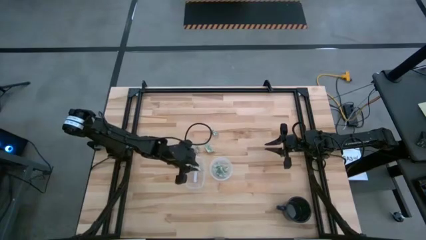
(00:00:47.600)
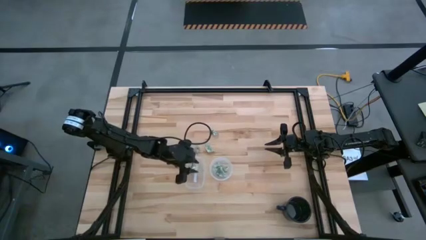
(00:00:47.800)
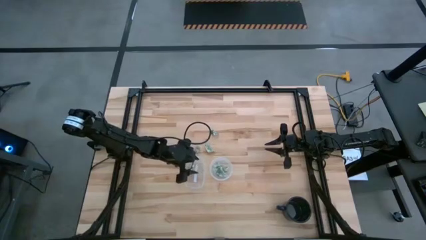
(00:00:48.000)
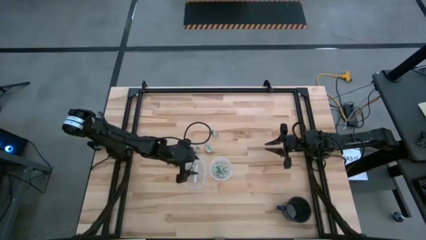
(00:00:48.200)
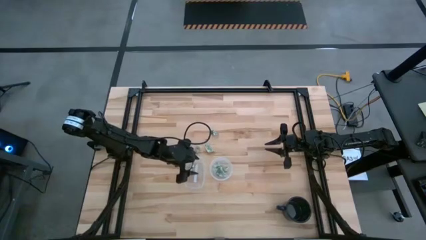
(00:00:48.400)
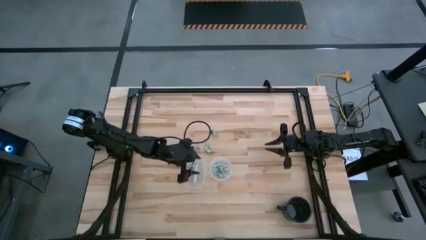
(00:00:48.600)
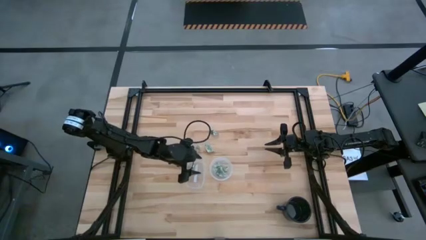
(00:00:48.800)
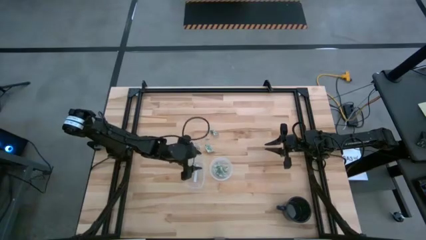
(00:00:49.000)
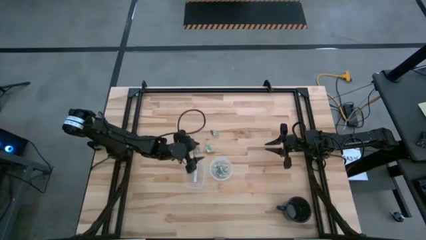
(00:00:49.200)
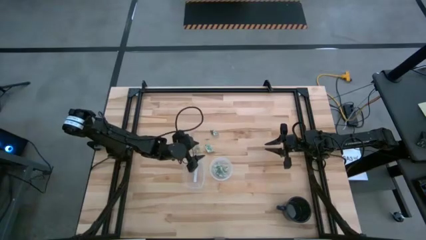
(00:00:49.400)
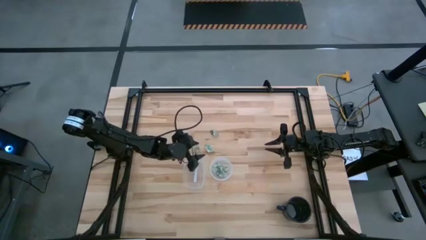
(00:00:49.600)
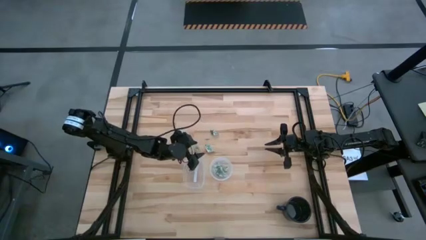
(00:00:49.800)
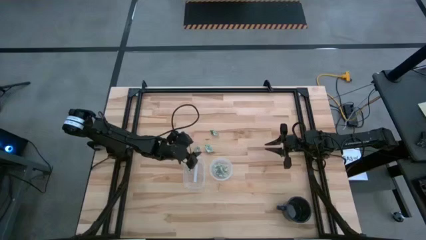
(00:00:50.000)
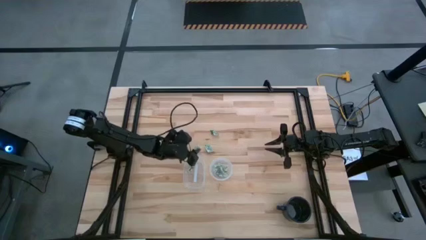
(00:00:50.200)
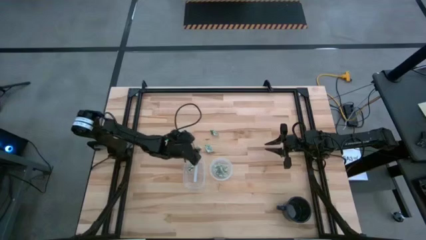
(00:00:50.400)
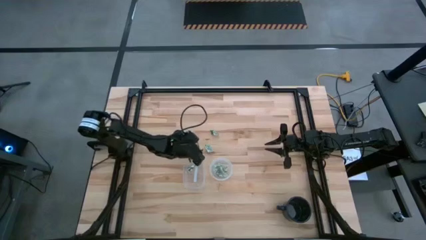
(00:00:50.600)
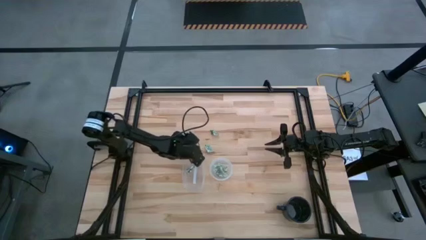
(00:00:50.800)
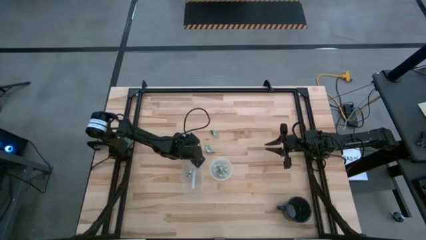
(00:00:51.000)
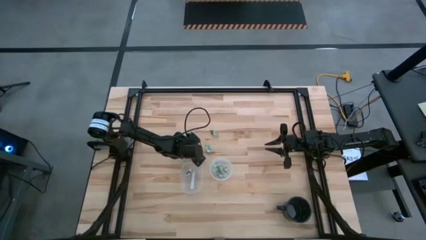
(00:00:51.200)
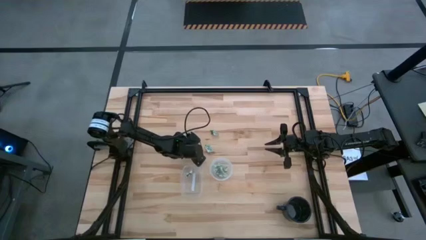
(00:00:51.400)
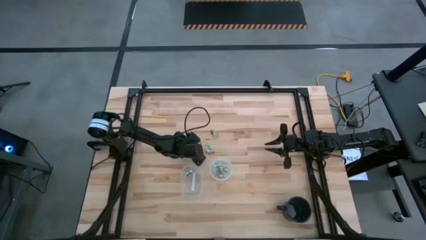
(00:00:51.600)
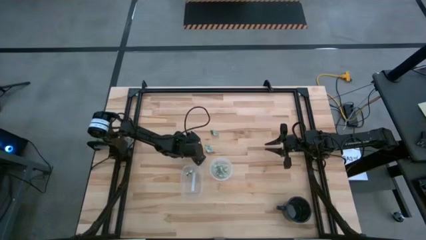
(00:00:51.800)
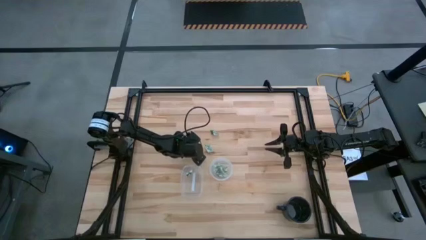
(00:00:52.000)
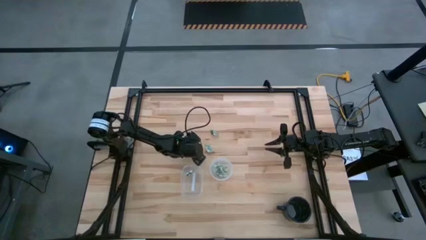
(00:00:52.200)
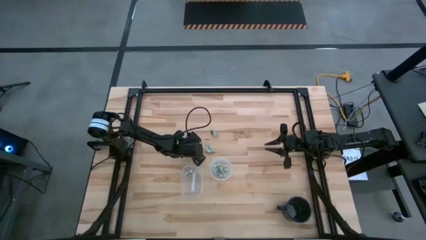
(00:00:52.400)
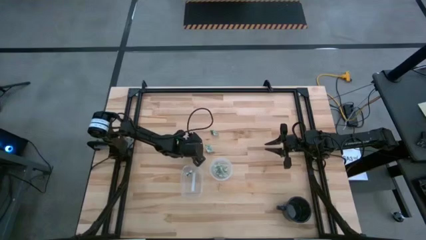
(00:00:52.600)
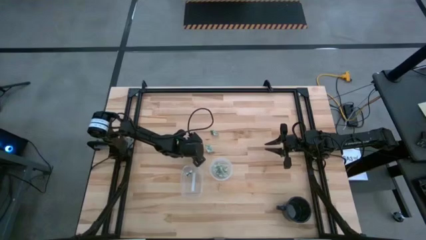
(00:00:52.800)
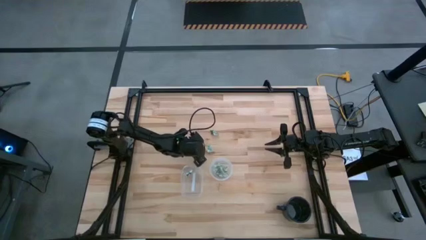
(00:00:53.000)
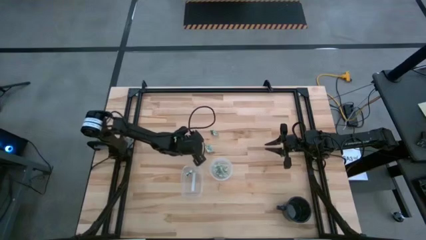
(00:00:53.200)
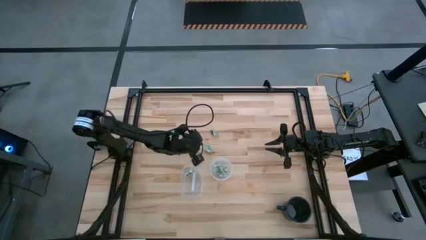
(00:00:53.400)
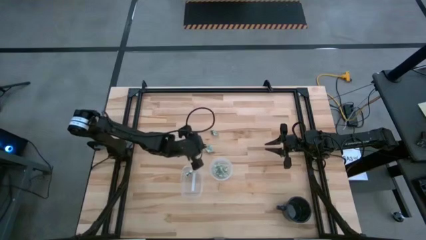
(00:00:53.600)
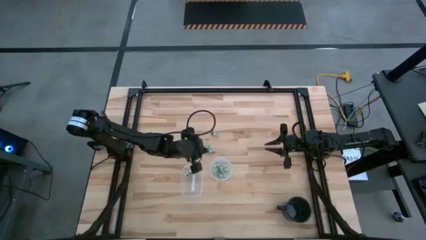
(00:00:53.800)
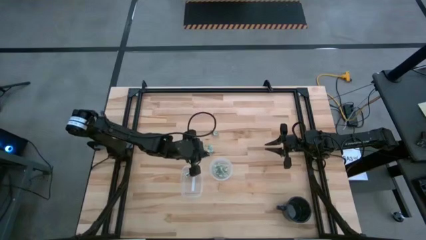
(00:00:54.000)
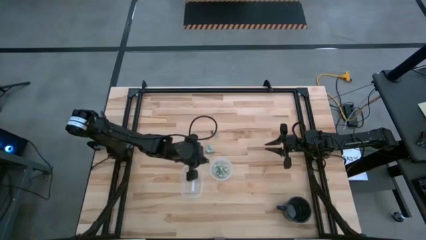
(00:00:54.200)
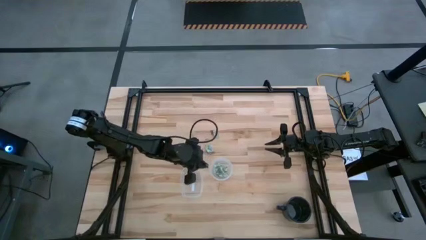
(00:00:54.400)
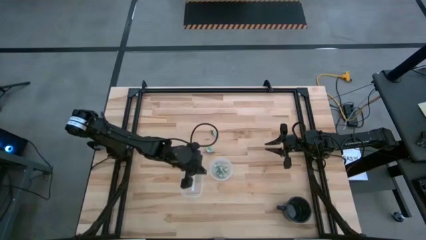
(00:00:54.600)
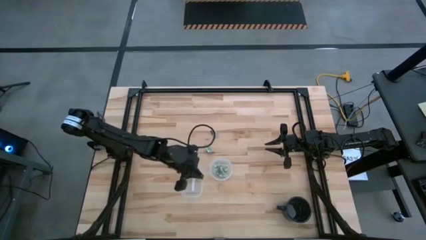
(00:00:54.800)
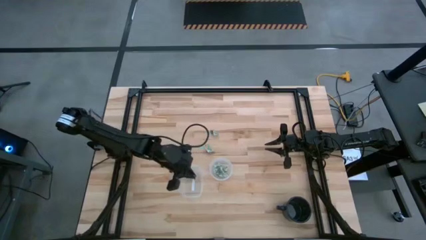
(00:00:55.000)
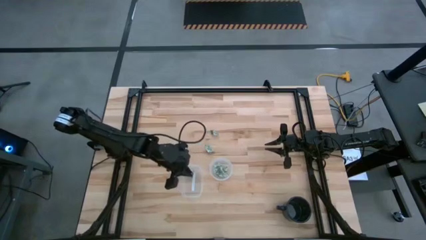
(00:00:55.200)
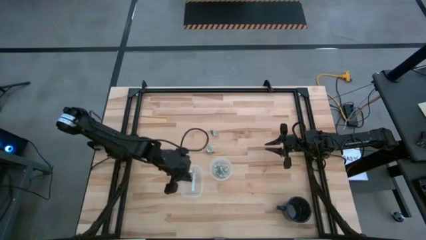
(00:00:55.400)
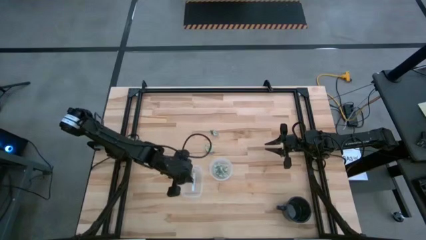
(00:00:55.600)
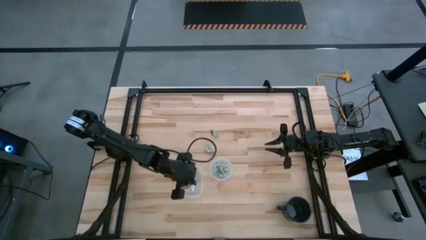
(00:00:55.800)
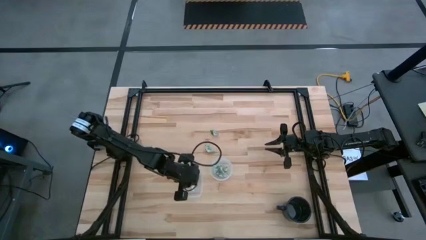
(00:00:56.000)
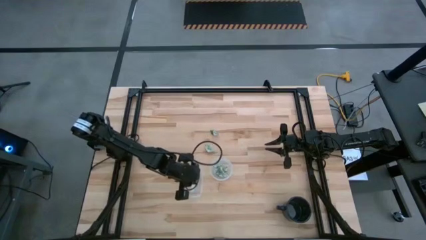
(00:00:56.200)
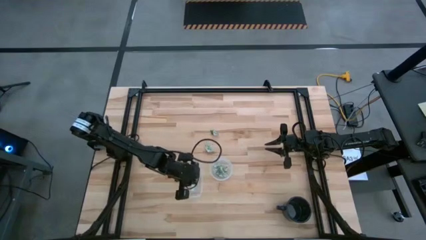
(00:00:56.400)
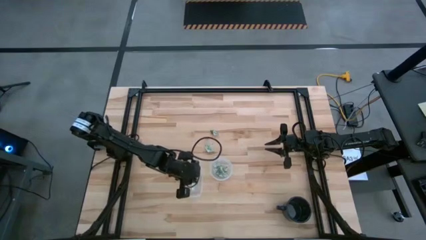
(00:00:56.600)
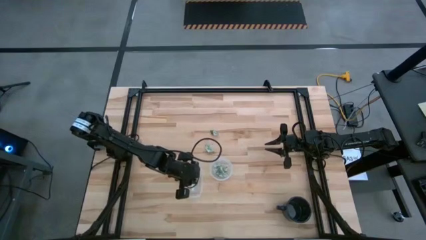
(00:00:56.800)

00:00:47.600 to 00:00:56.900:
Task: Pick and place items into bin
Put the stevia packet into the left transparent bin

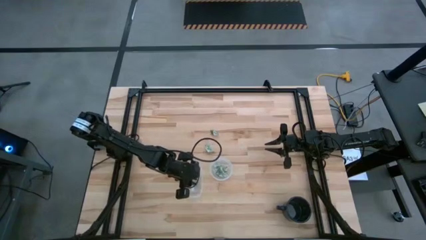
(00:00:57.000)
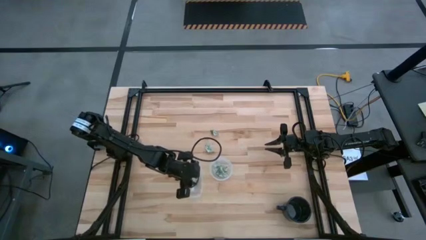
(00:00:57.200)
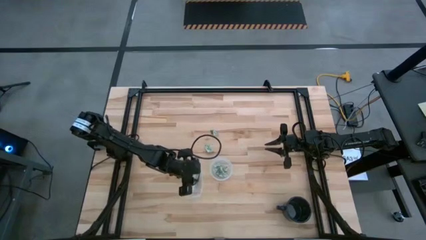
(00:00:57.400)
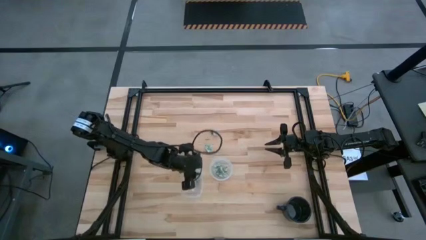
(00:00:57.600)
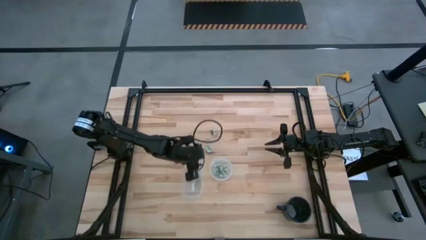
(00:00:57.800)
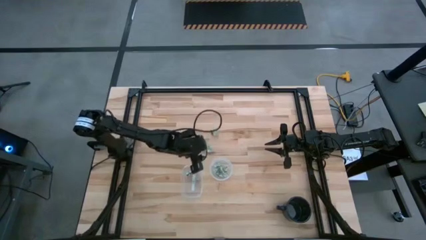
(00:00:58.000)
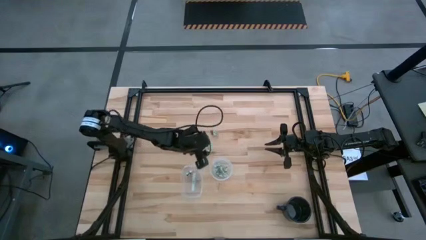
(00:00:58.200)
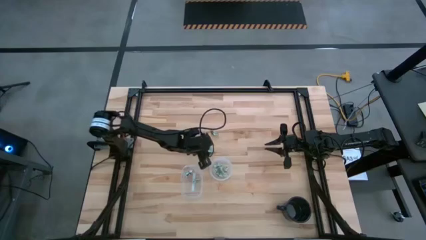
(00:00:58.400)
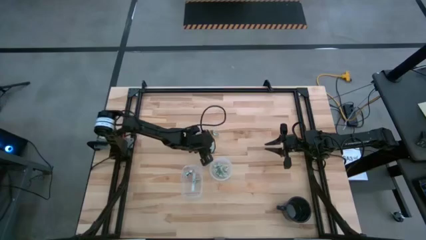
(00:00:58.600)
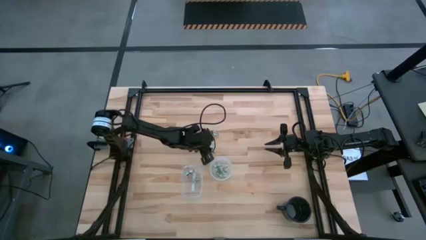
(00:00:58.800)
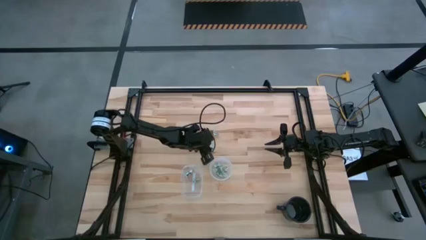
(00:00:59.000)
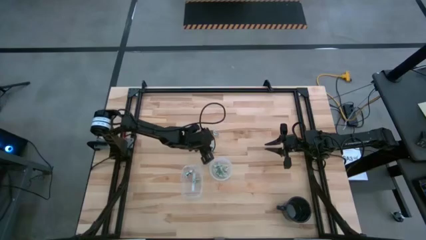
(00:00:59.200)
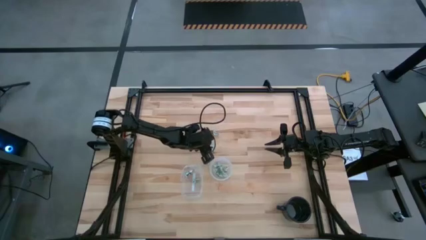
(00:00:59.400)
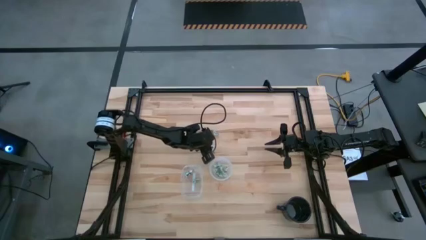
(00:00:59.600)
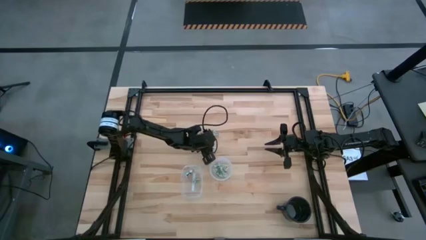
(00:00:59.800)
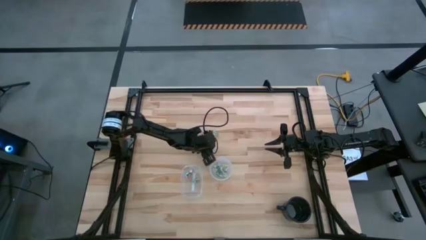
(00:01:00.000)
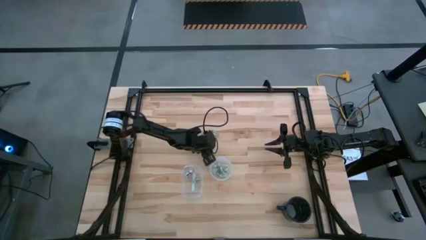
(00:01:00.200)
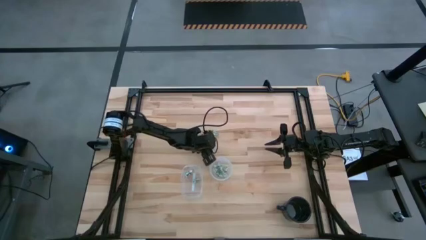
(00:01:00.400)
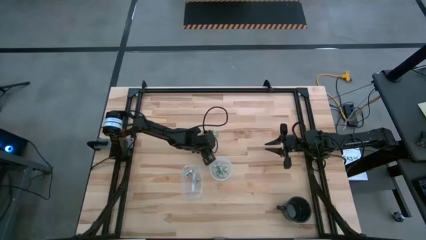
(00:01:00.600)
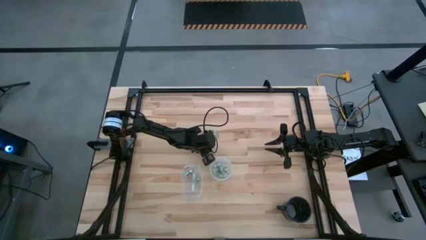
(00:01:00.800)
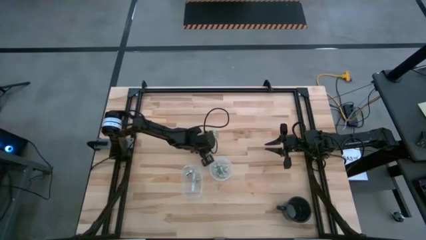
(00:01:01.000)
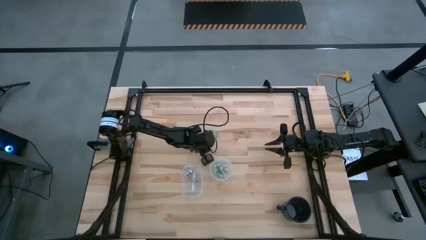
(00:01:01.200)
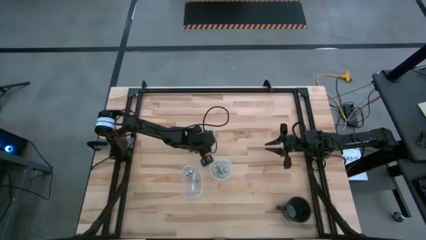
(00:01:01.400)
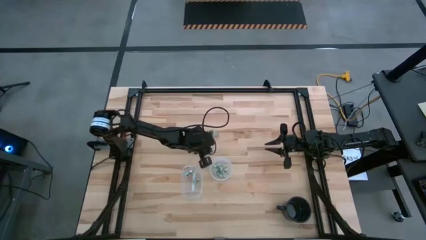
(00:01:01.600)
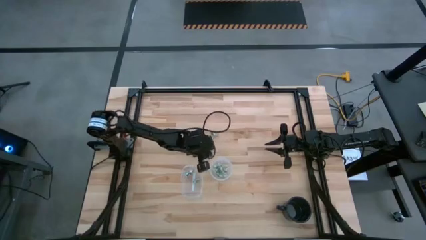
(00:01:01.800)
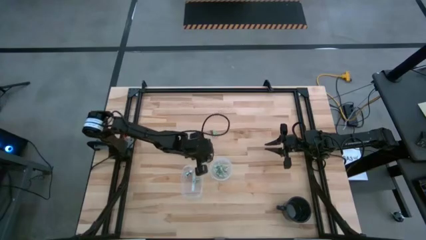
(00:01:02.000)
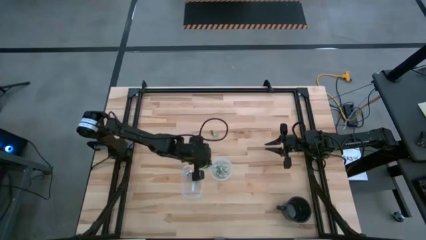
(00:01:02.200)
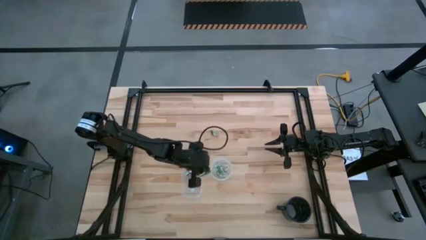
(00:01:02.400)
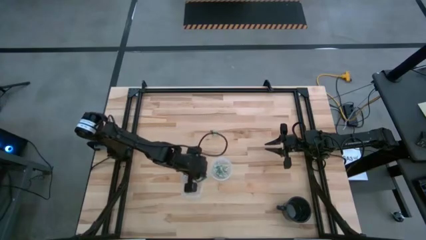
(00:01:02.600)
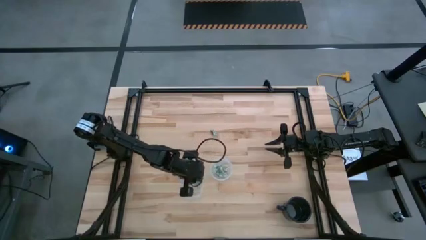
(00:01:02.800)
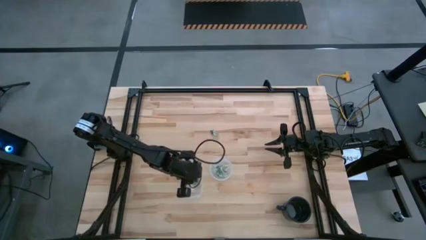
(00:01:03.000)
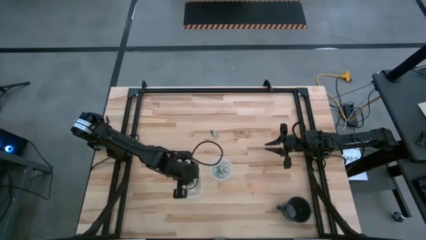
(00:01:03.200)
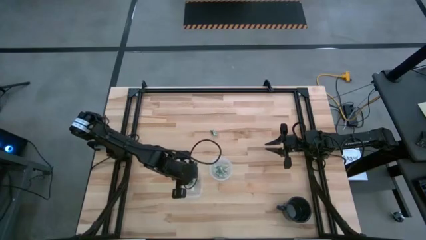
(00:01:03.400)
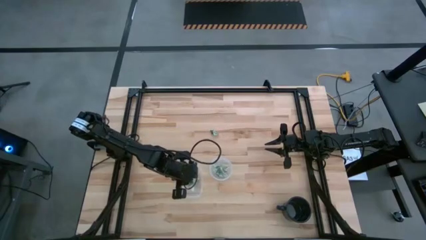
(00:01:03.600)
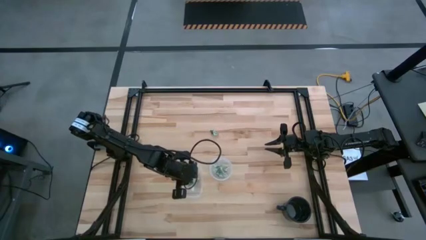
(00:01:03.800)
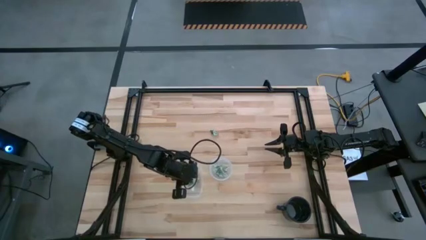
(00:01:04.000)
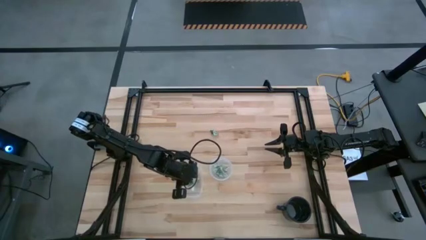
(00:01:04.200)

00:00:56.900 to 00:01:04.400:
Put the stevia packet into the left transparent bin
